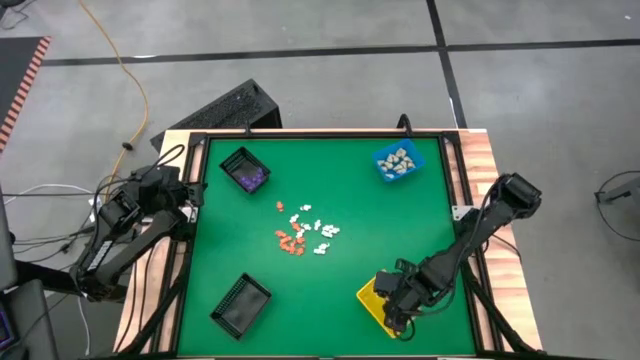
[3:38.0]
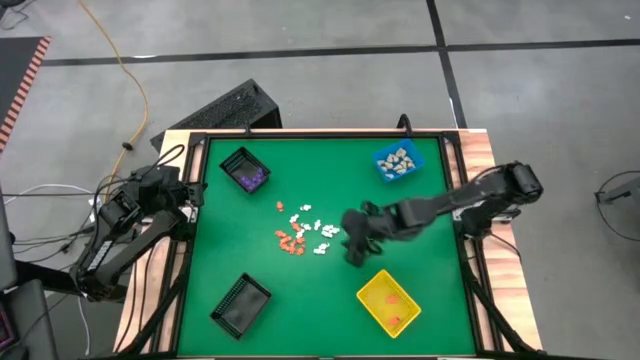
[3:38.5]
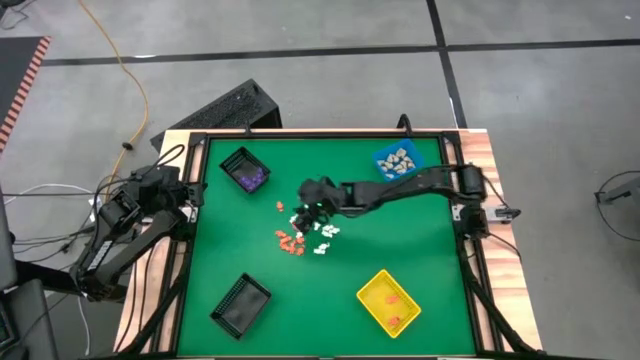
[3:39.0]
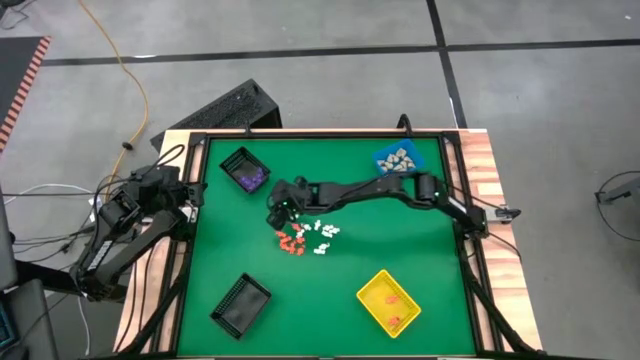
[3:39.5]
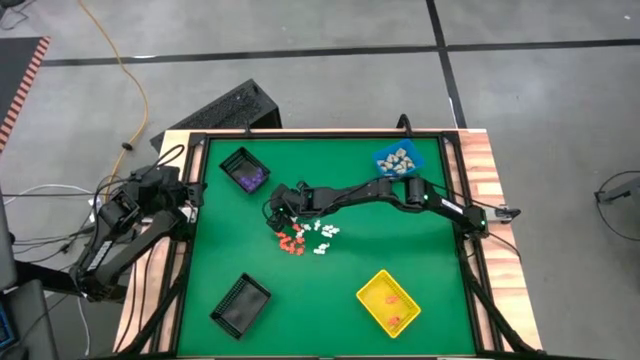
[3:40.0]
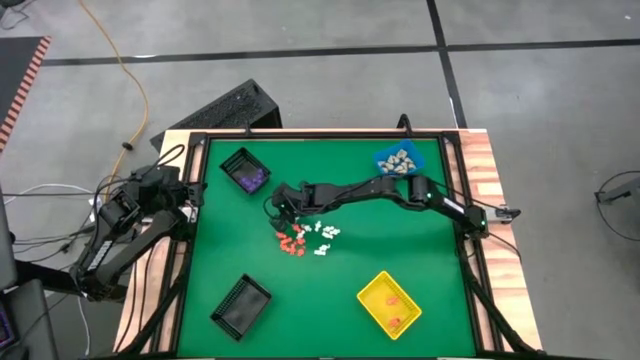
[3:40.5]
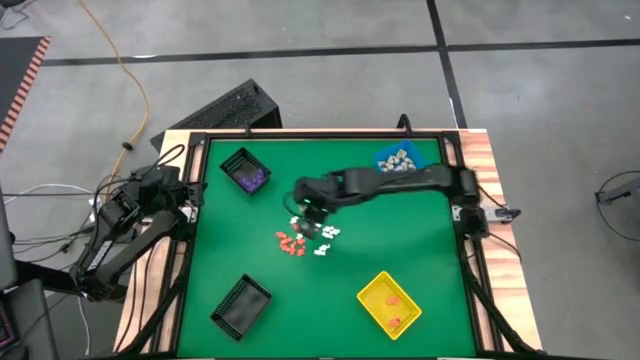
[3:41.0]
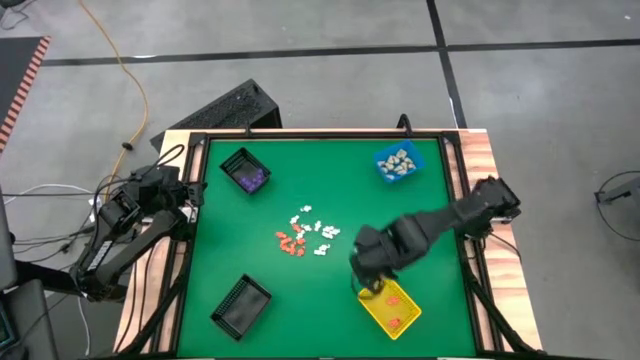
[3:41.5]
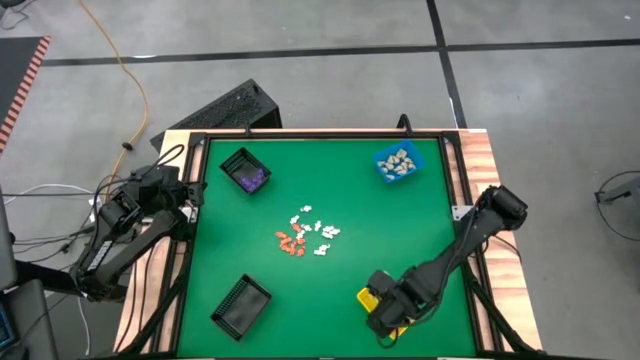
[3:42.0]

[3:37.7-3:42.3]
Task: Sort Halloween decoration
Put the orange skeleton toy into the yellow basket

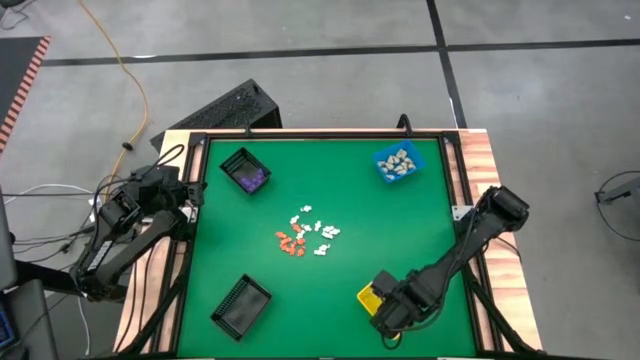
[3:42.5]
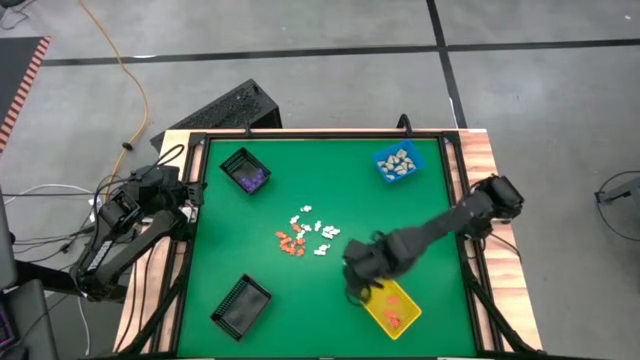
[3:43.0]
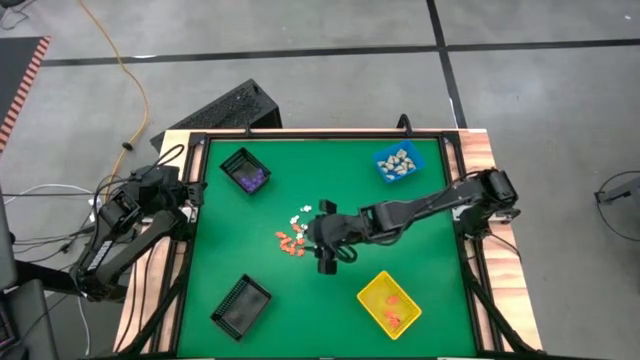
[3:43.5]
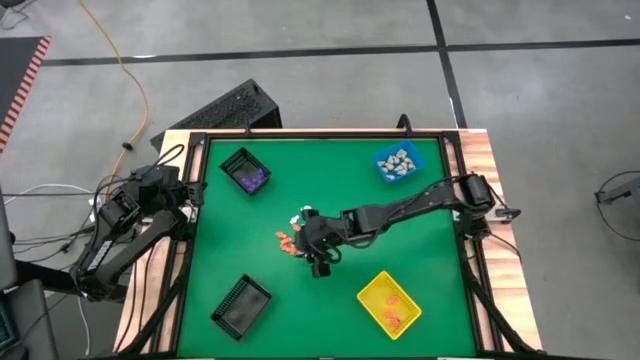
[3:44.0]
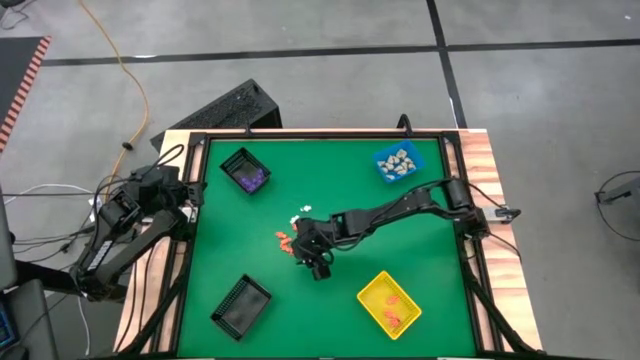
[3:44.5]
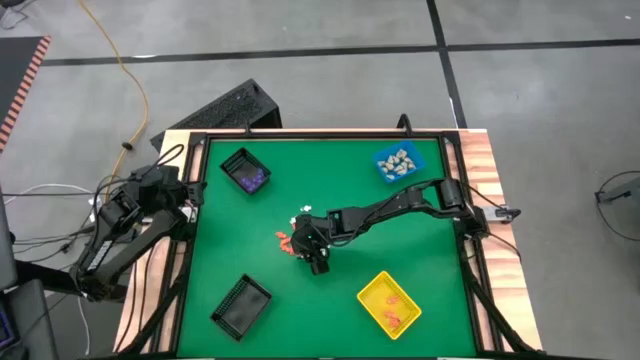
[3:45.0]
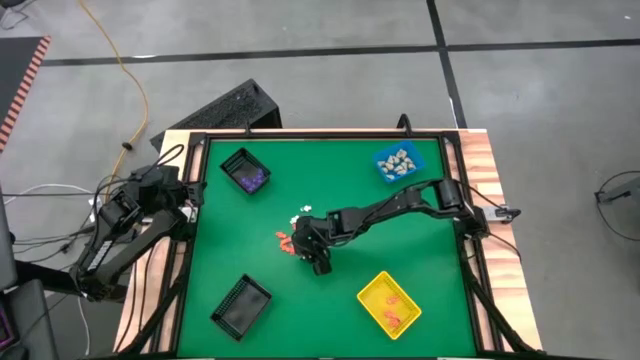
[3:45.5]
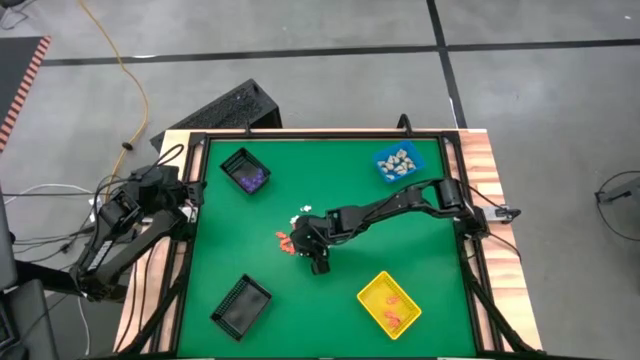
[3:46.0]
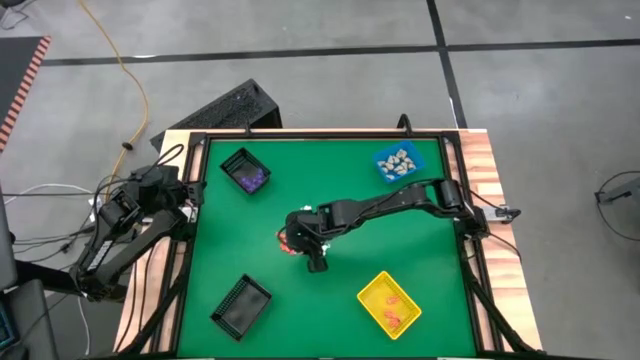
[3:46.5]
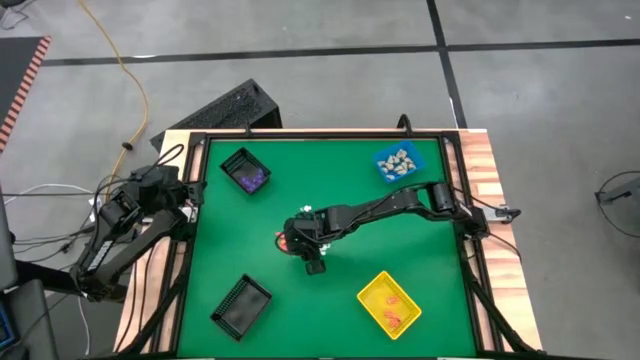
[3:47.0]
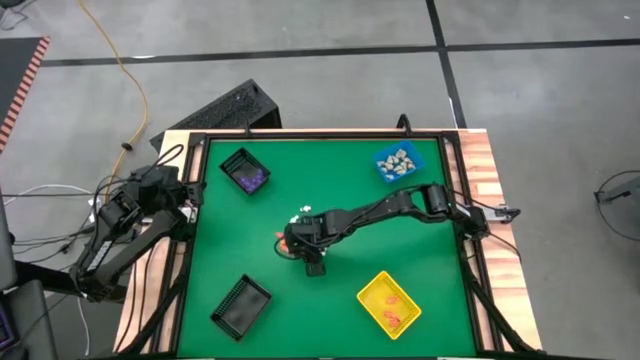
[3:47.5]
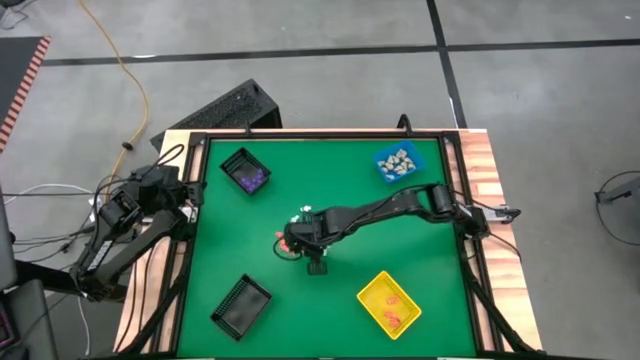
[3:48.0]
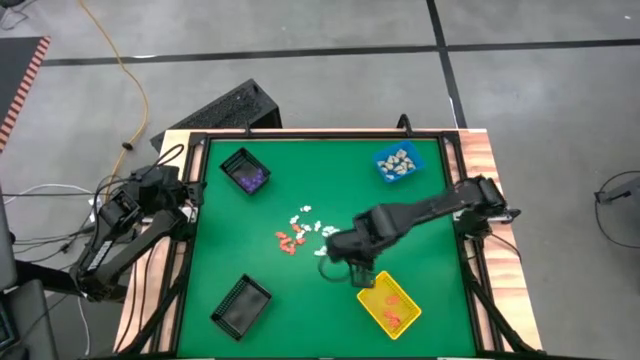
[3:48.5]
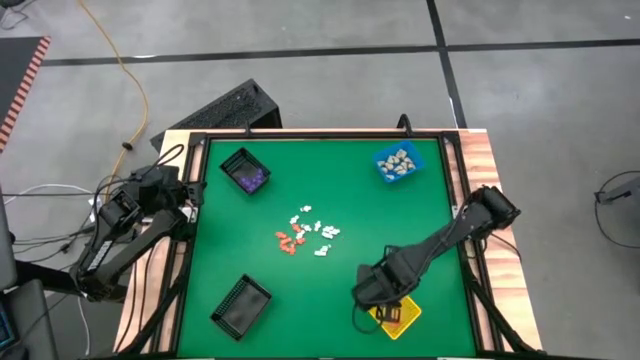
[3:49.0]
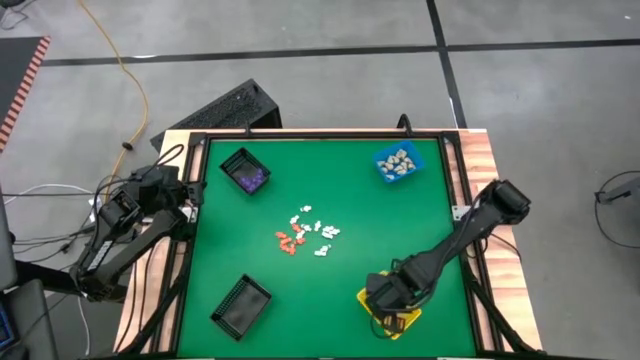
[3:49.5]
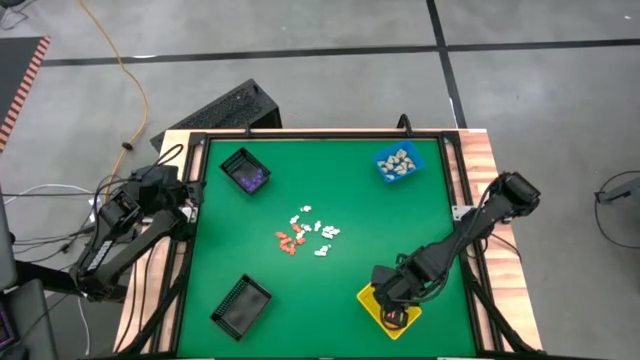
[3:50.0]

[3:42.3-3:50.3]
Put the orange skeleton toy into the yellow basket

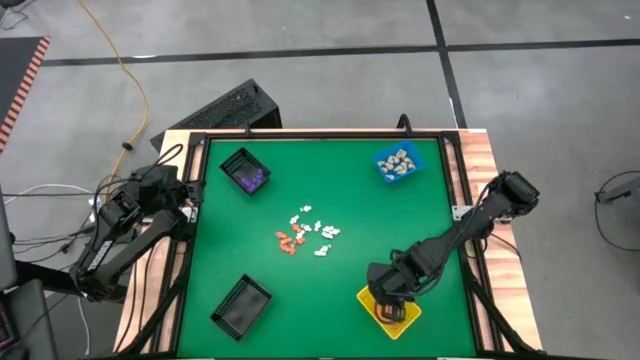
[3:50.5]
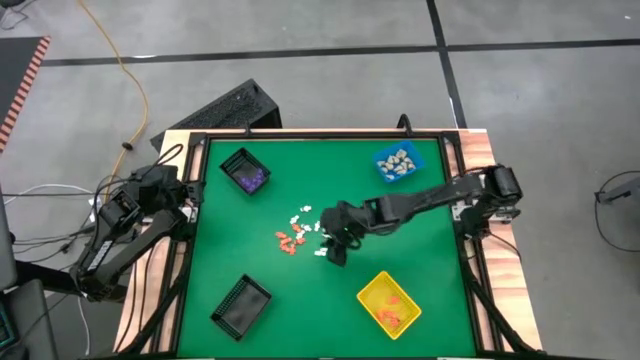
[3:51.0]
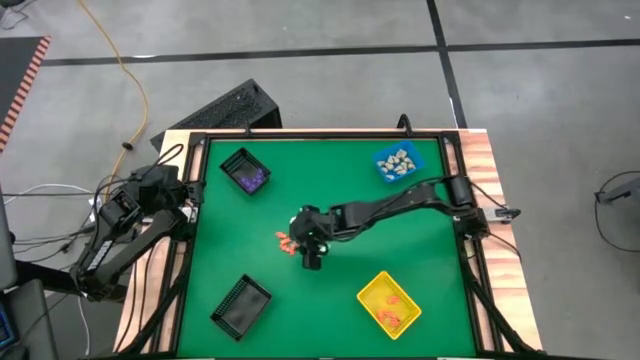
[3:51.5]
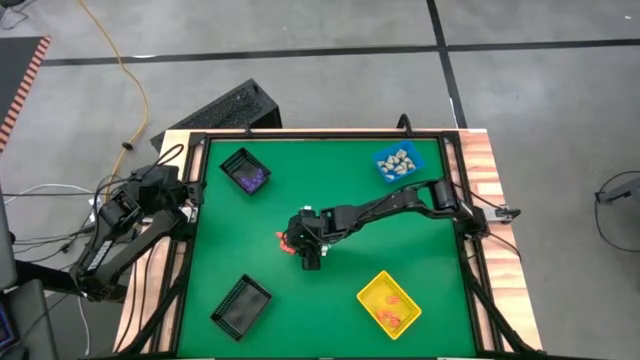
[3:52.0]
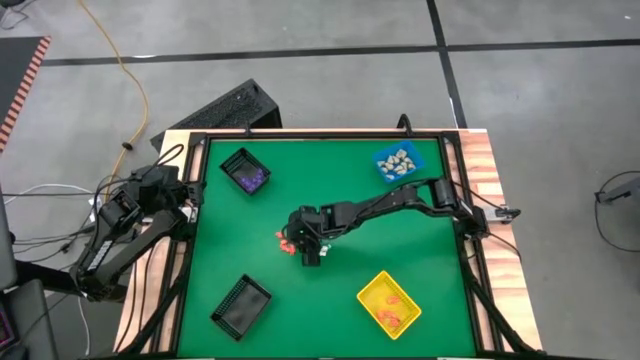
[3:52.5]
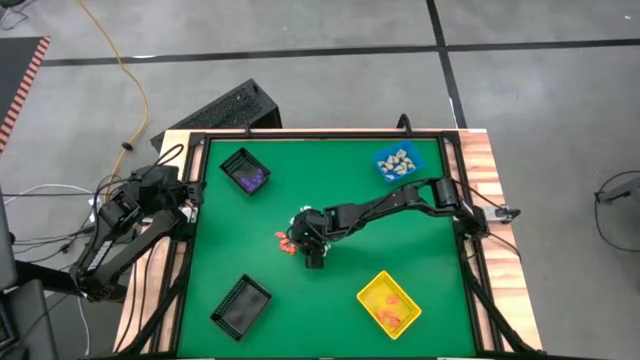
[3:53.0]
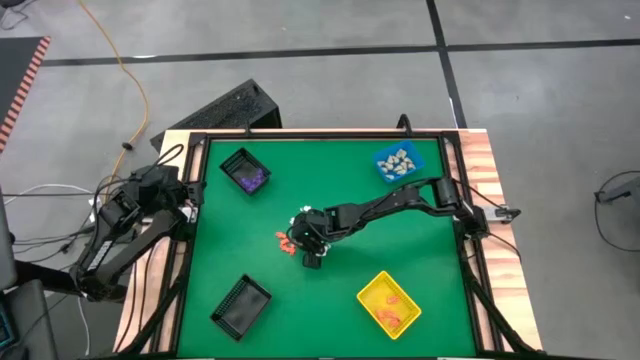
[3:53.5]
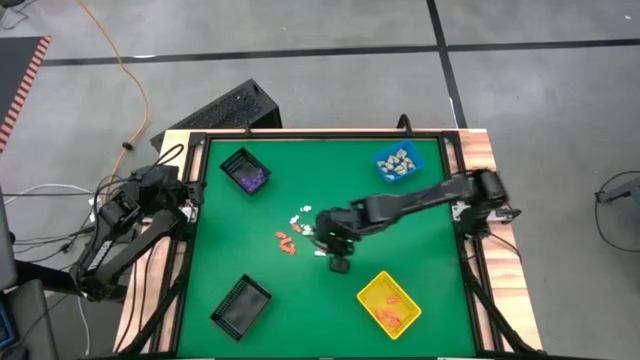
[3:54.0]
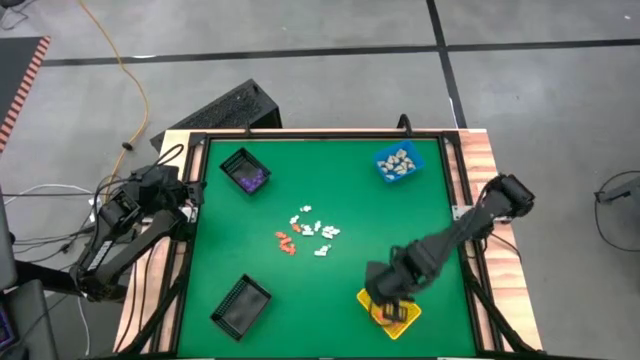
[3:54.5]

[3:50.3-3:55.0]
Put the orange skeleton toy into the yellow basket

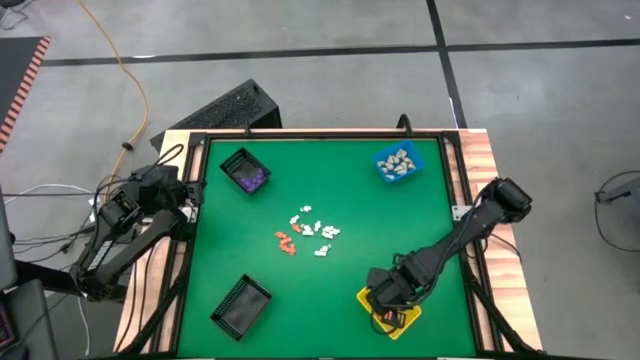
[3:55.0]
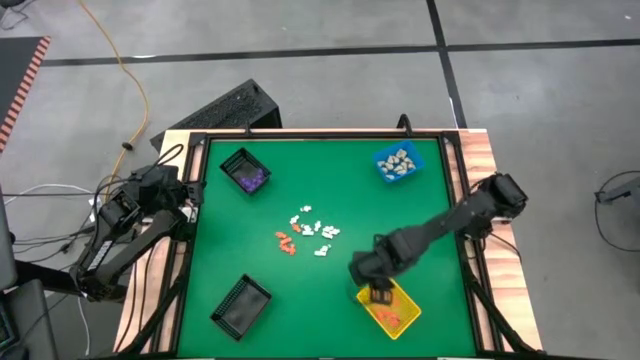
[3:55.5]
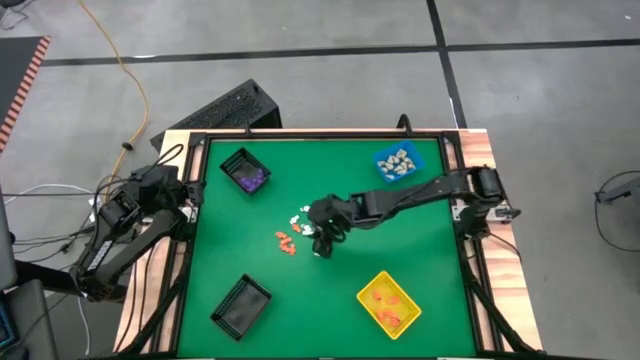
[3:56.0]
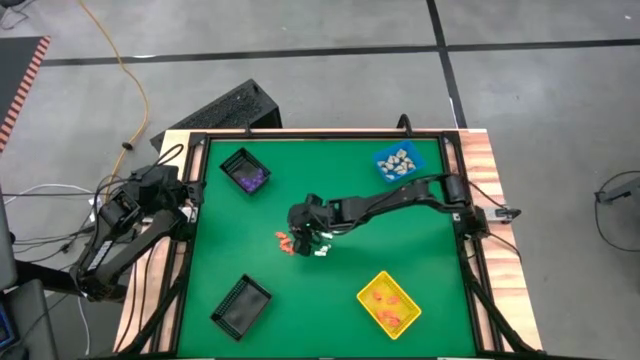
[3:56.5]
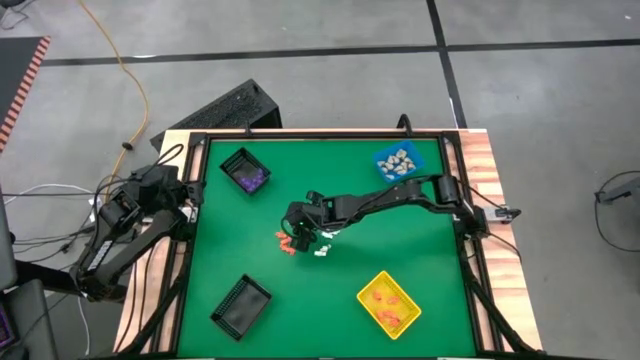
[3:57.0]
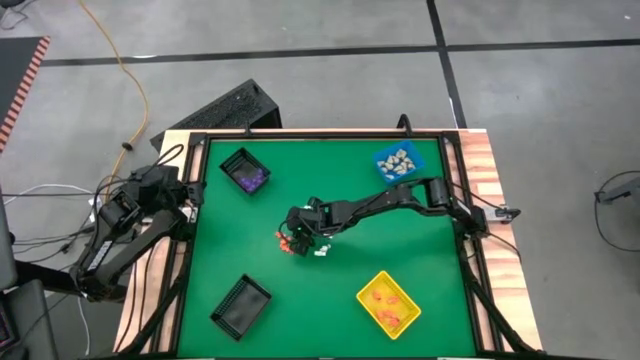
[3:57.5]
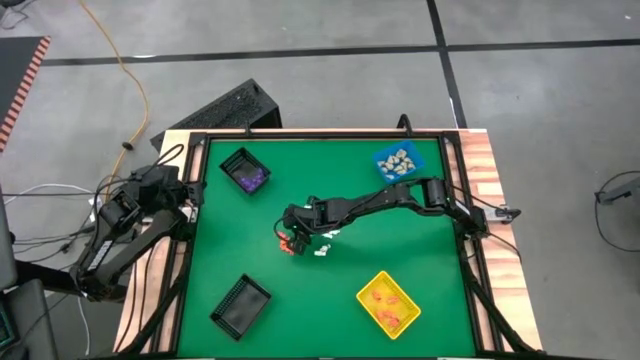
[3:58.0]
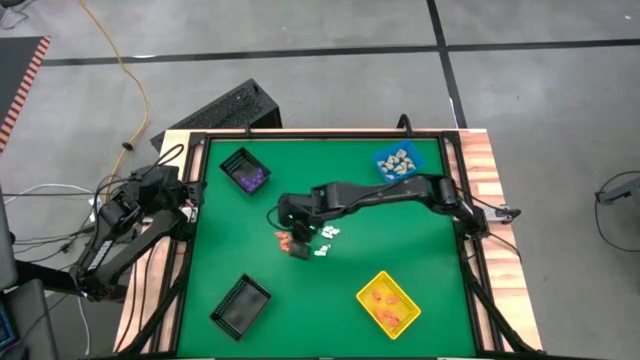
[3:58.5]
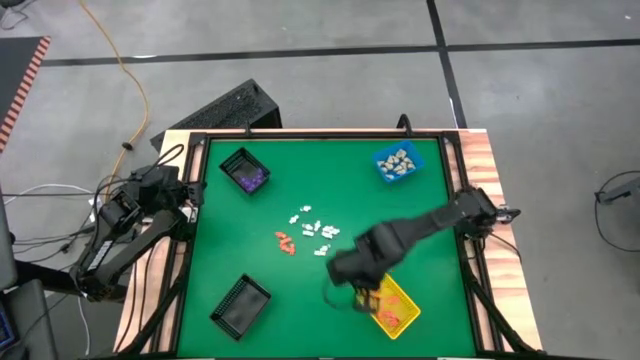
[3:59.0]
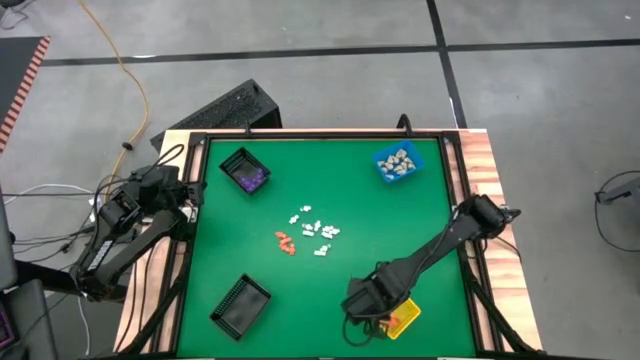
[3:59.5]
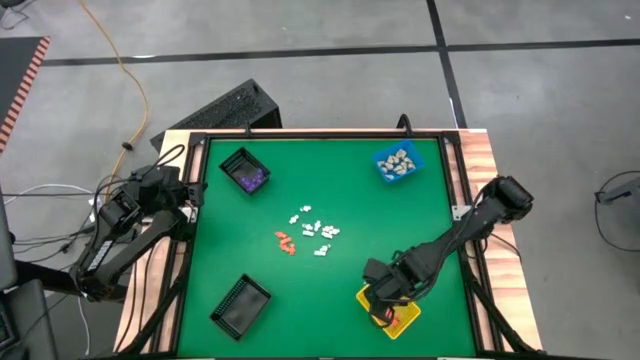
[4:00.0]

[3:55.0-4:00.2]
Put the orange skeleton toy into the yellow basket
